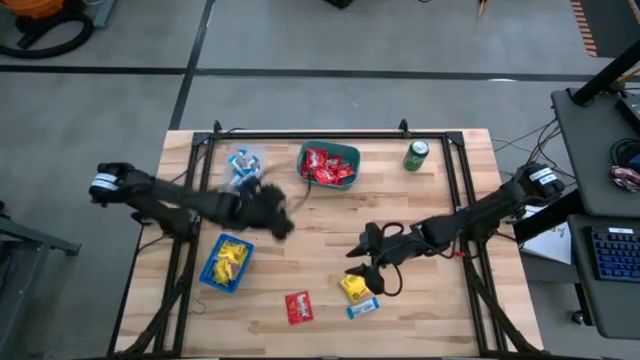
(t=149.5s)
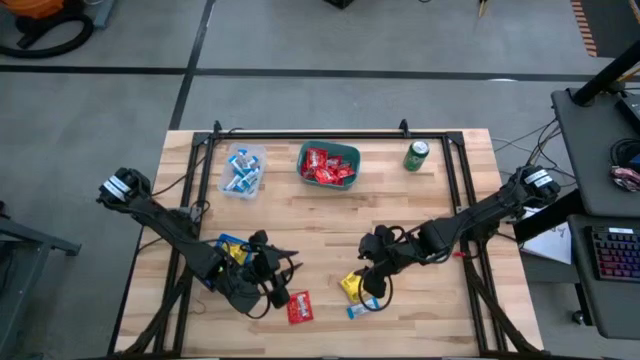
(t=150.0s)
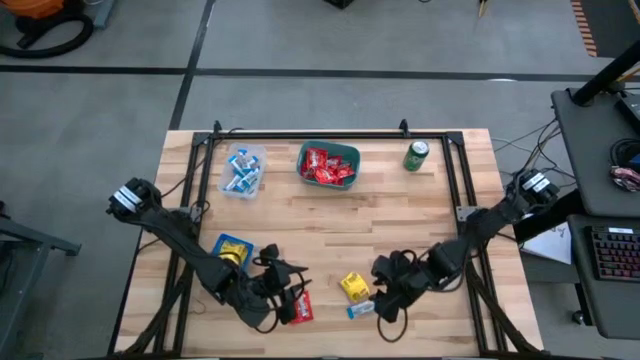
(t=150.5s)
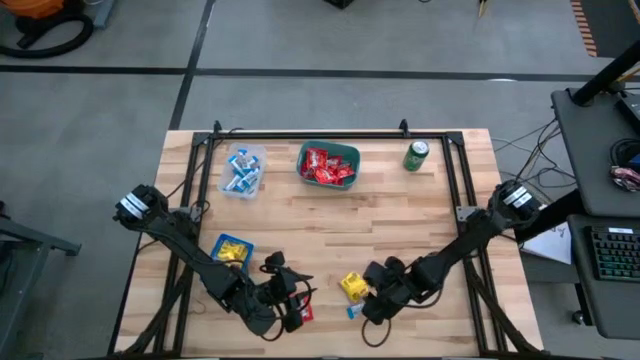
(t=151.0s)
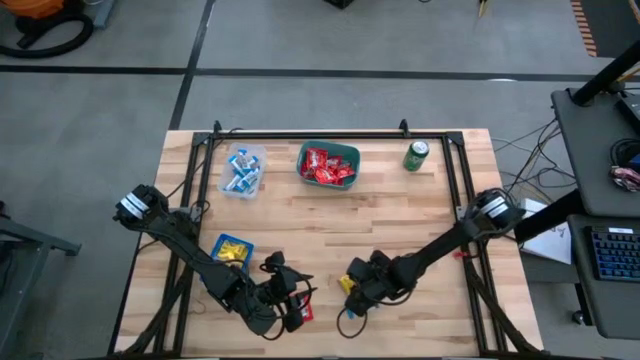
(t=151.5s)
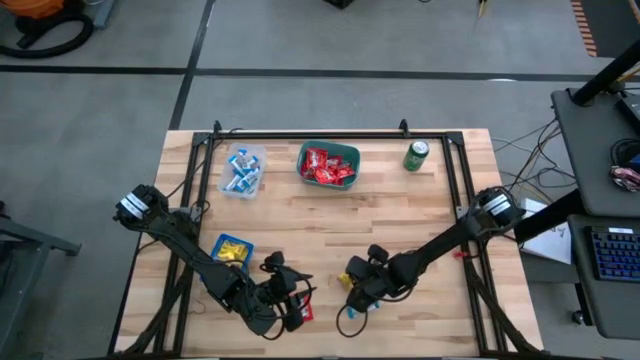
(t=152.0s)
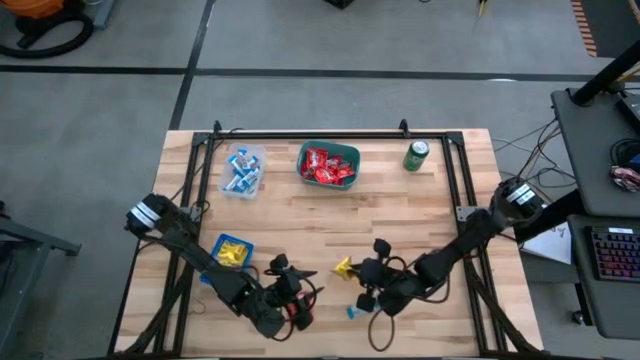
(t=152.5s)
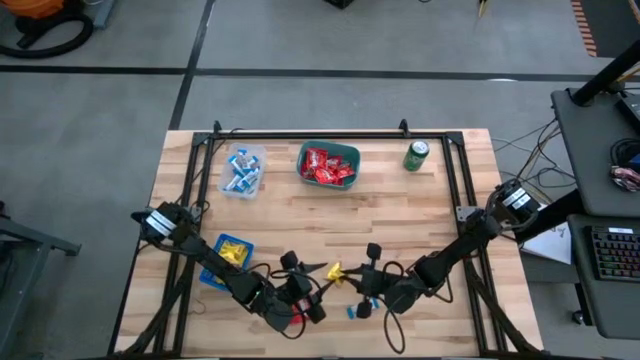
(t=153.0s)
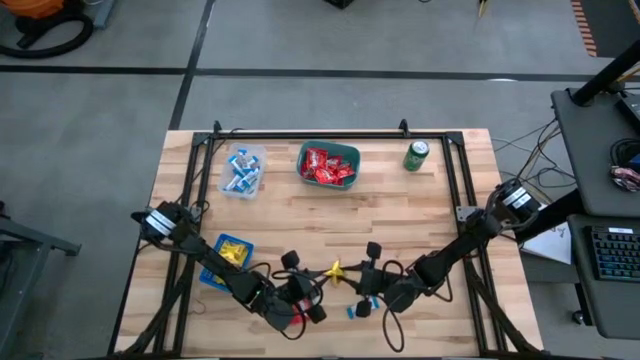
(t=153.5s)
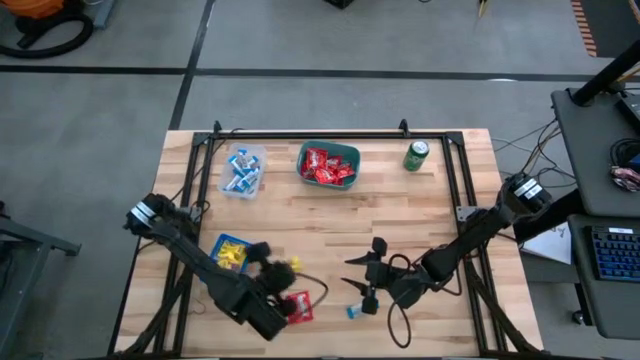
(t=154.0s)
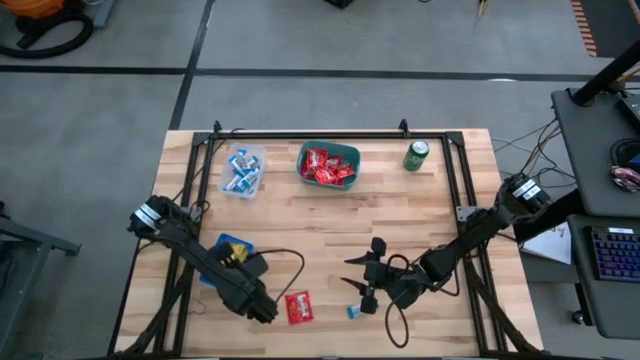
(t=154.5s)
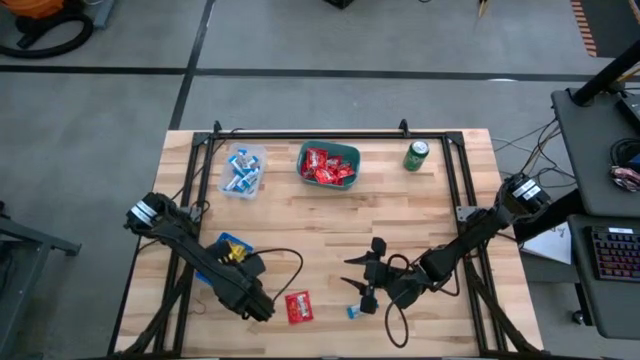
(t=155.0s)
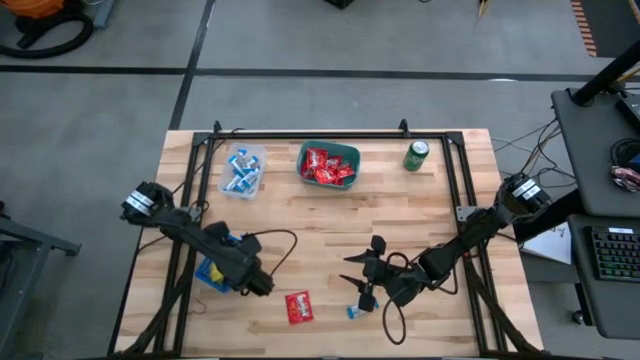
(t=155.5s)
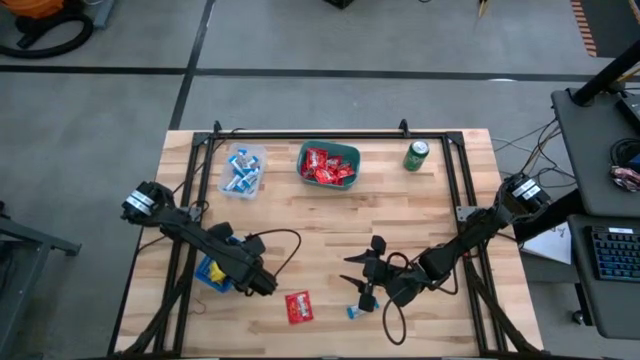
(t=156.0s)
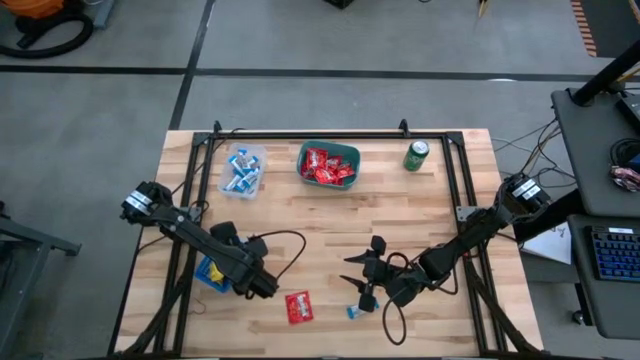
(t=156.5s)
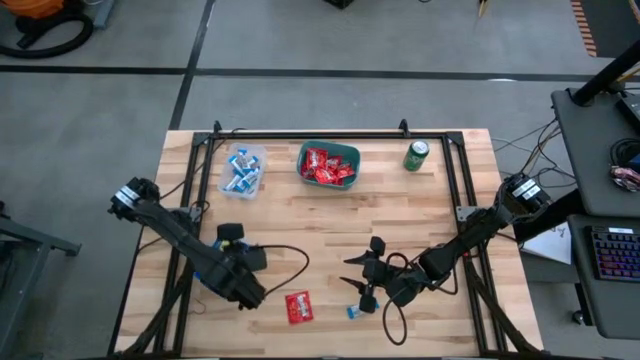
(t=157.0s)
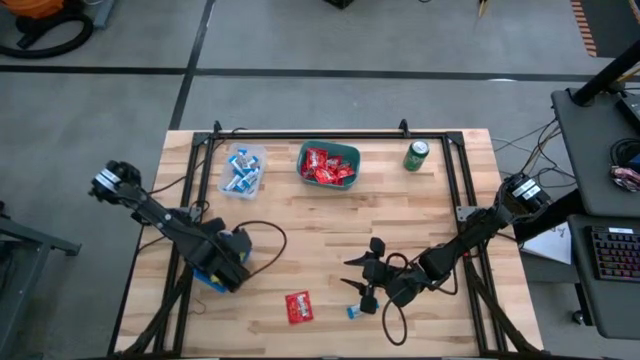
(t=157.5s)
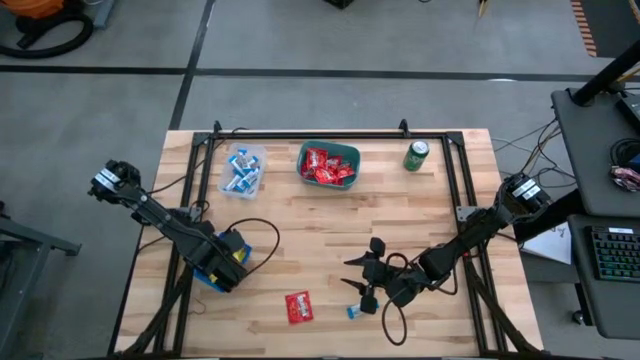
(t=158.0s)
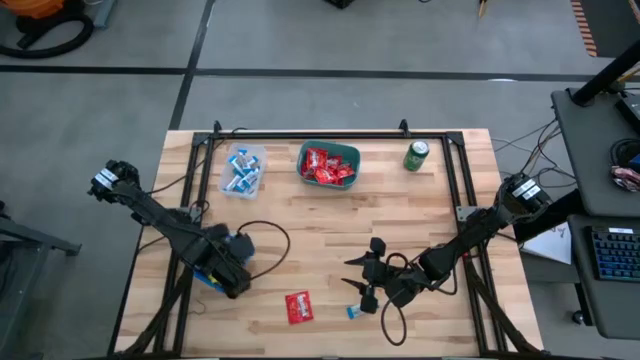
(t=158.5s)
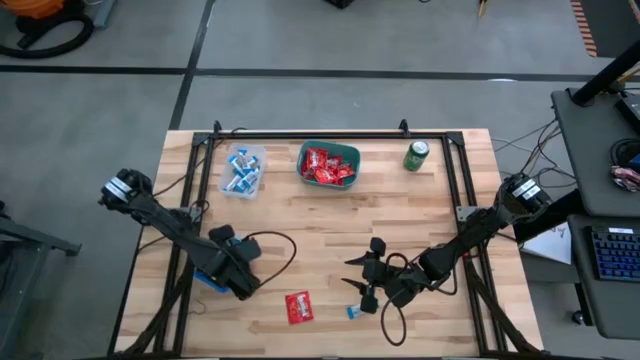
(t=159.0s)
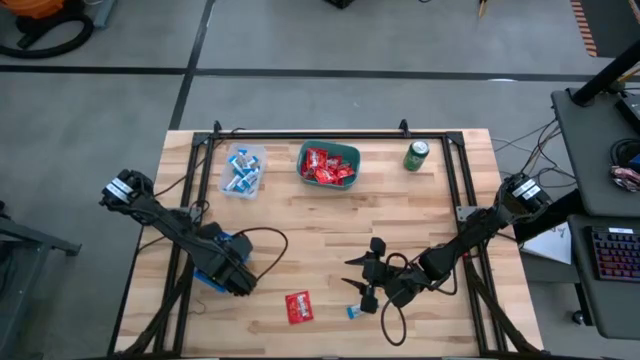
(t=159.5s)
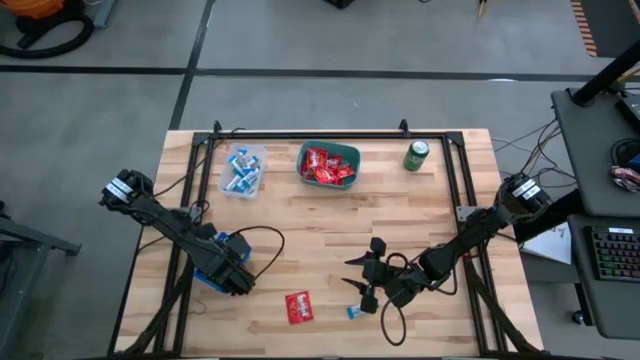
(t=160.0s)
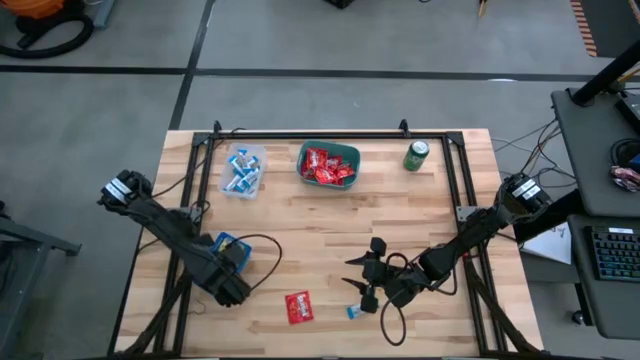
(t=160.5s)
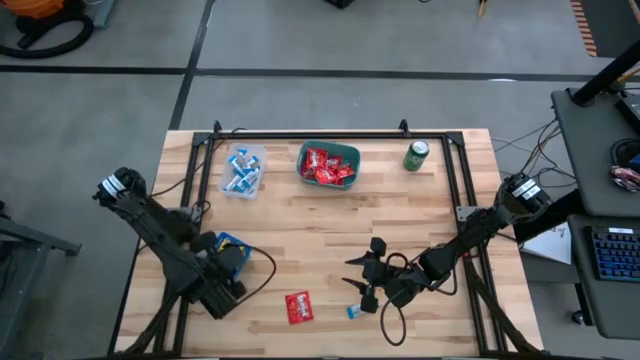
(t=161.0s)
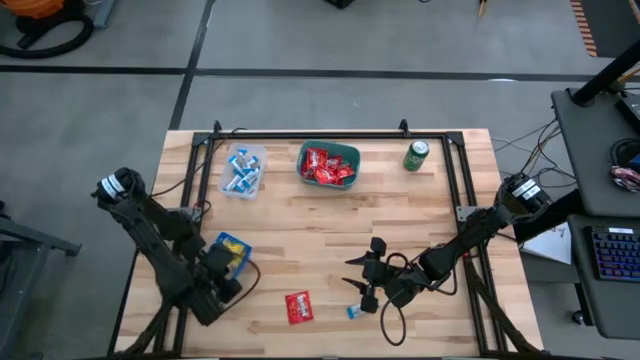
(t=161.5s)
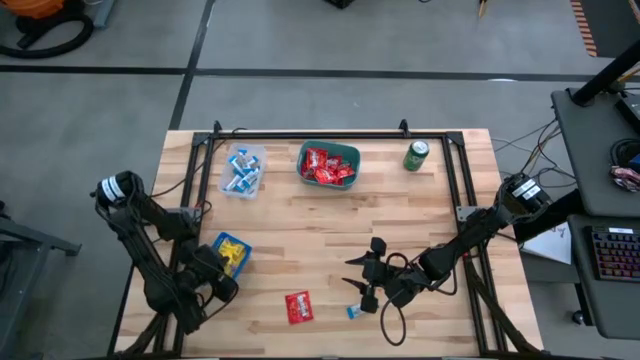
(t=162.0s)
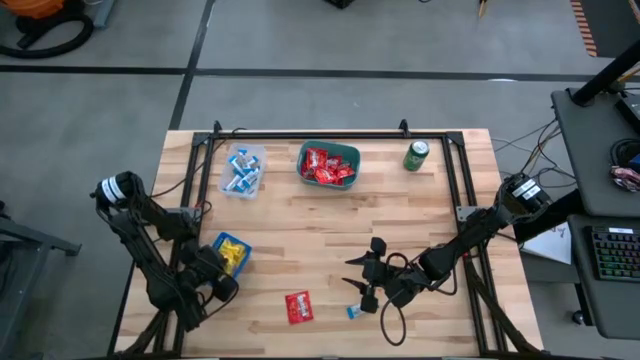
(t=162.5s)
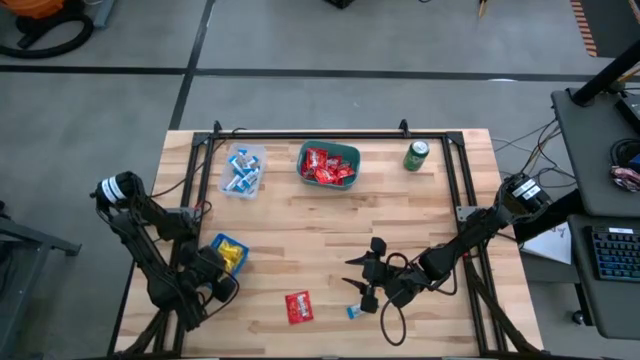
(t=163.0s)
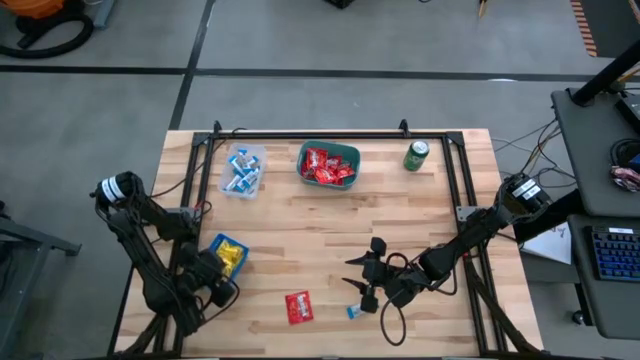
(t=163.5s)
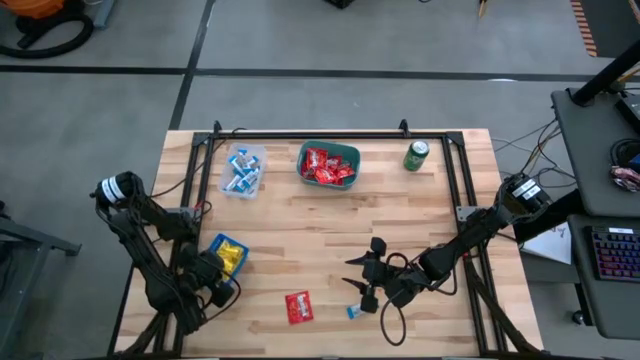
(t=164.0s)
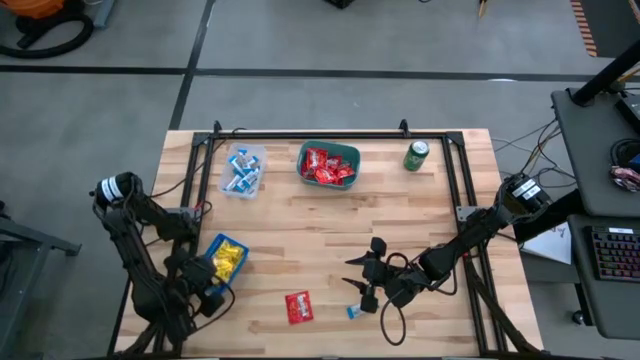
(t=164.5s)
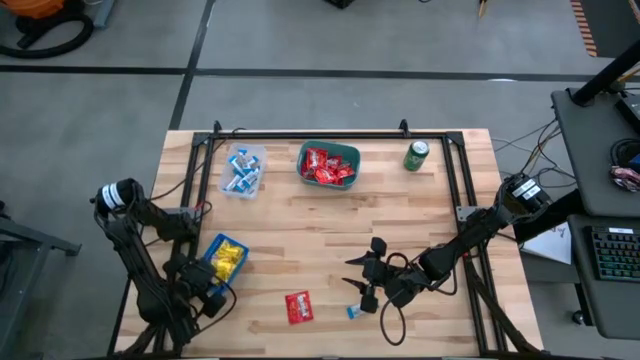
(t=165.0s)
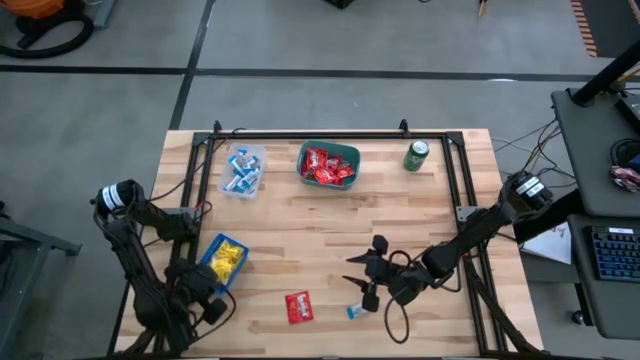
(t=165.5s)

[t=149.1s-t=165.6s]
Task: Sort candy
Put the yellow candy into the blue basket

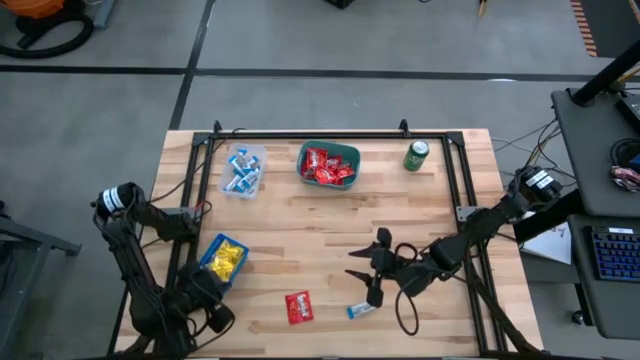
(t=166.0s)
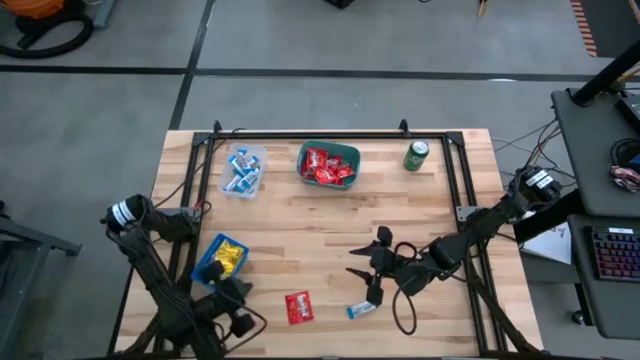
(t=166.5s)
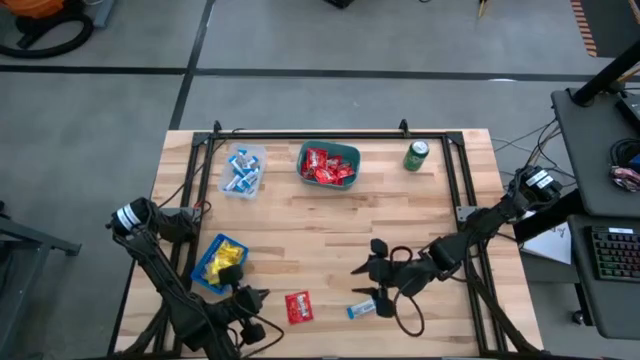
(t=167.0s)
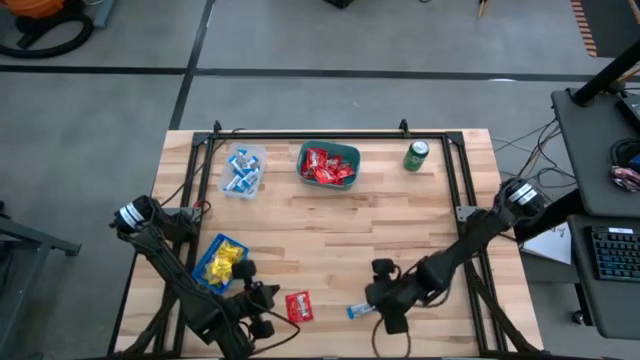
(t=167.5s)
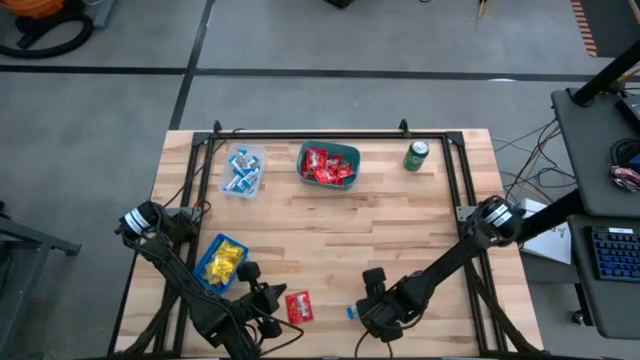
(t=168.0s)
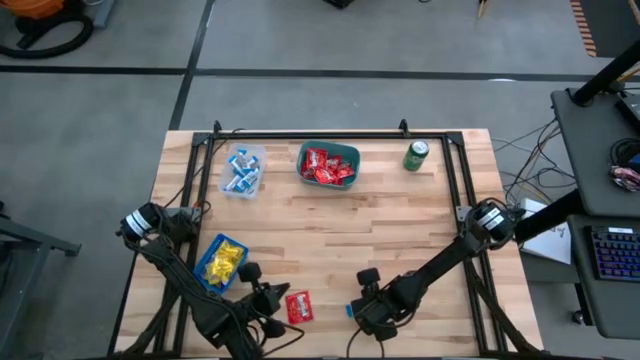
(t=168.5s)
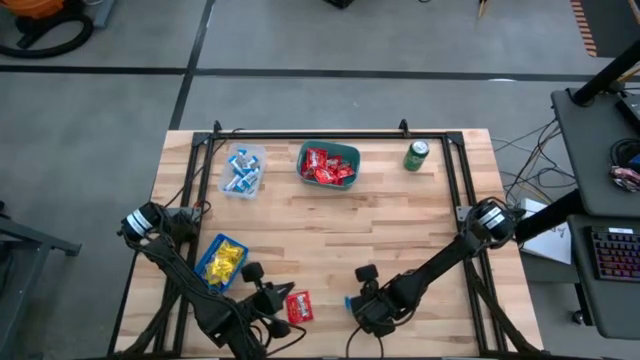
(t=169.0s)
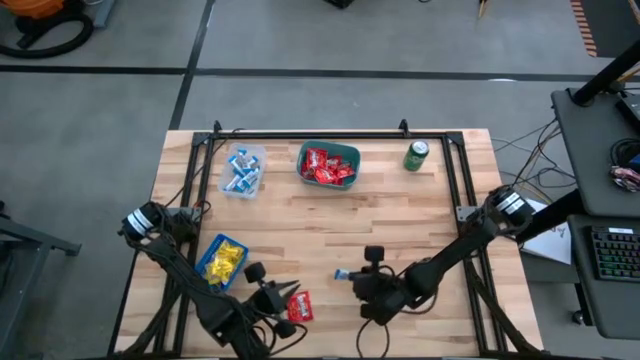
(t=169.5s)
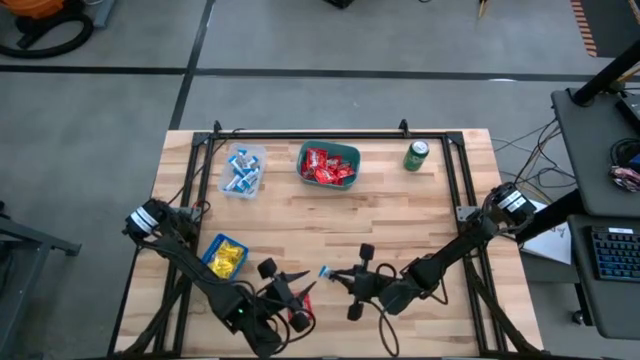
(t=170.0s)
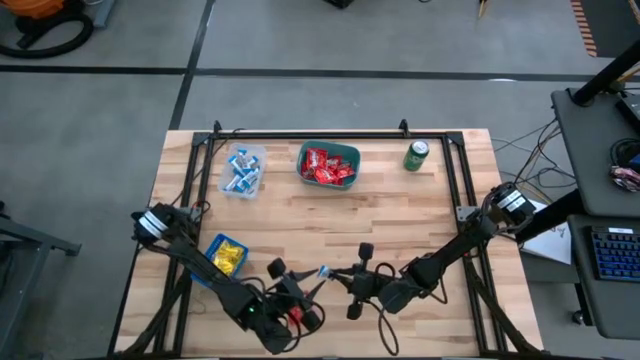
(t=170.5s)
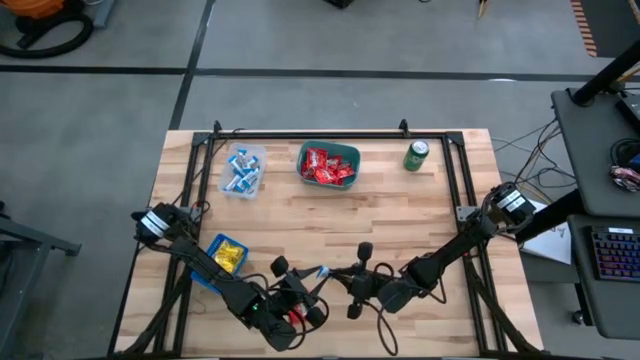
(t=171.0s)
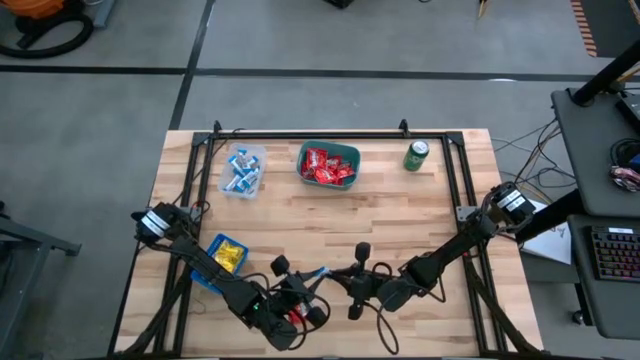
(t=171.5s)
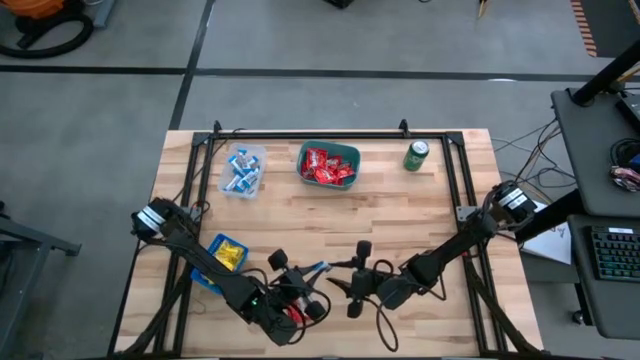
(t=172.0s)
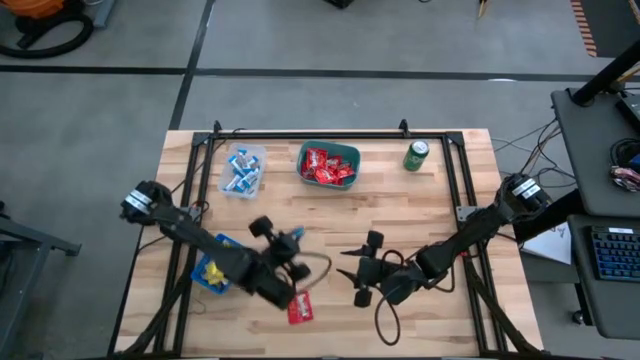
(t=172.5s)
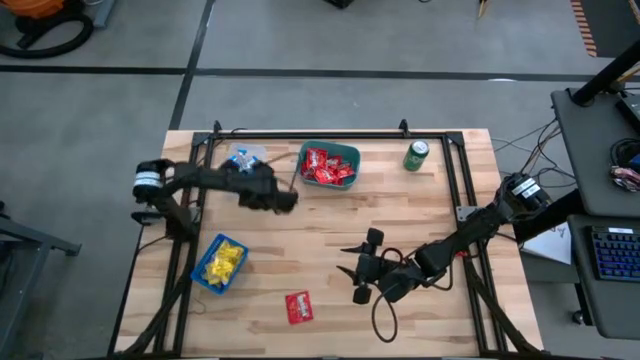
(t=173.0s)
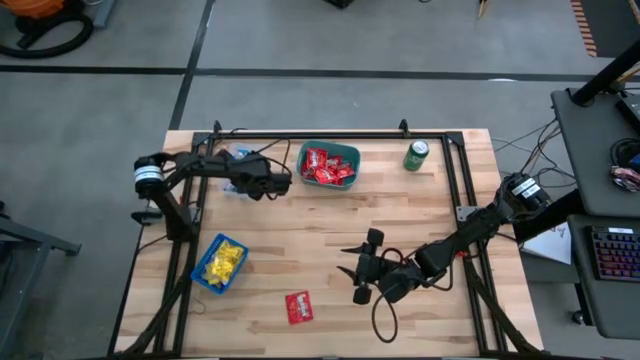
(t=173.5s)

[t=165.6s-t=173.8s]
Put the white candy into the transparent bin
